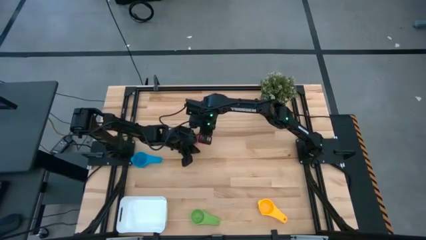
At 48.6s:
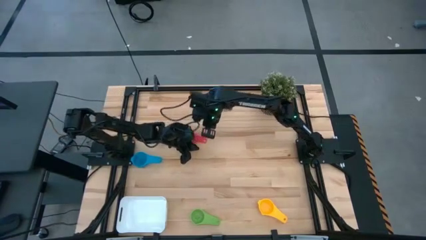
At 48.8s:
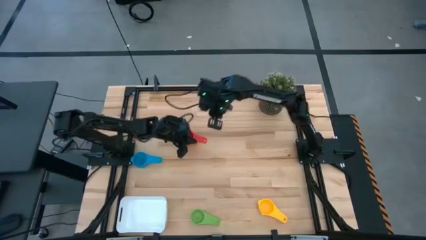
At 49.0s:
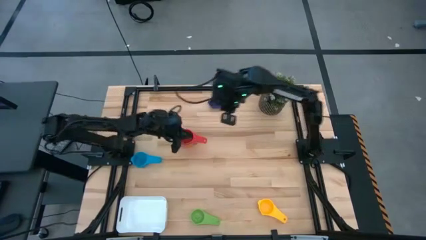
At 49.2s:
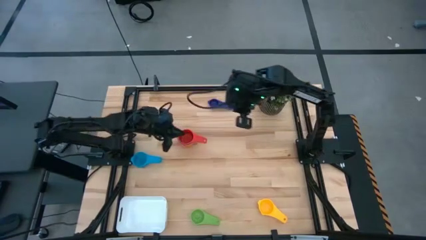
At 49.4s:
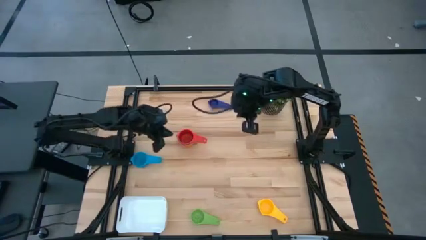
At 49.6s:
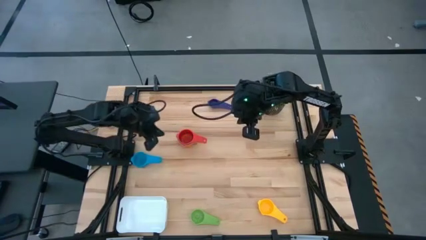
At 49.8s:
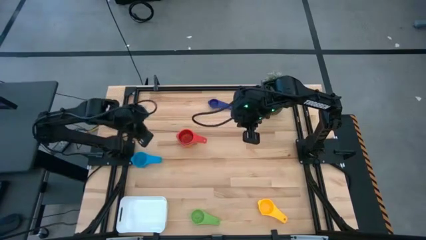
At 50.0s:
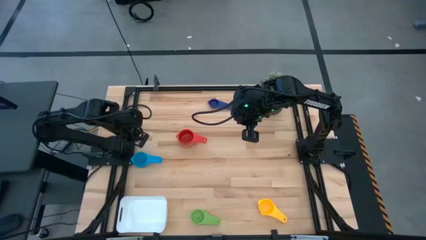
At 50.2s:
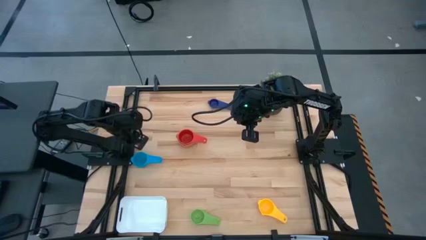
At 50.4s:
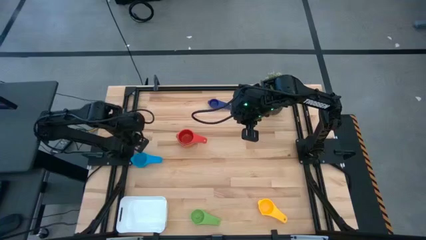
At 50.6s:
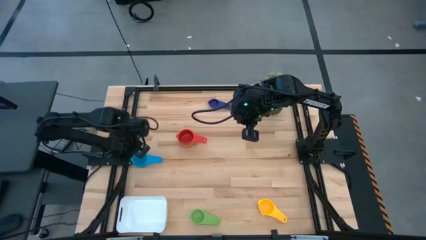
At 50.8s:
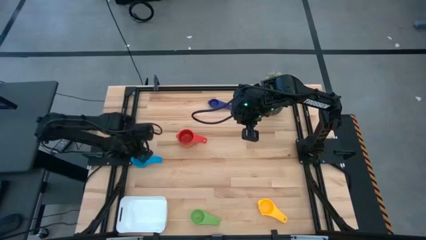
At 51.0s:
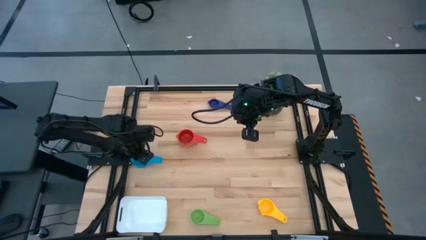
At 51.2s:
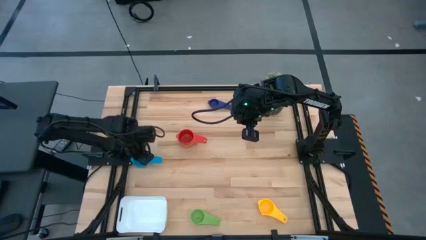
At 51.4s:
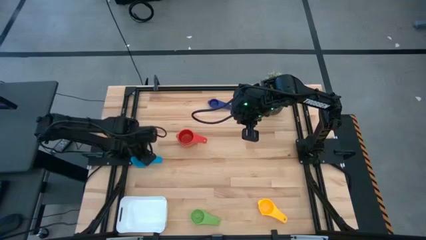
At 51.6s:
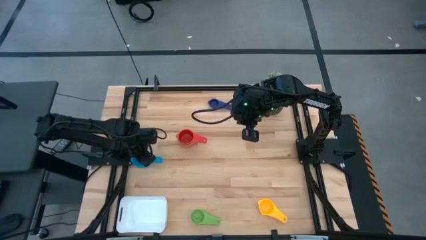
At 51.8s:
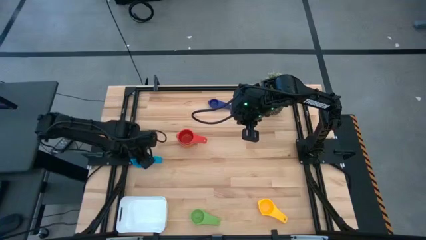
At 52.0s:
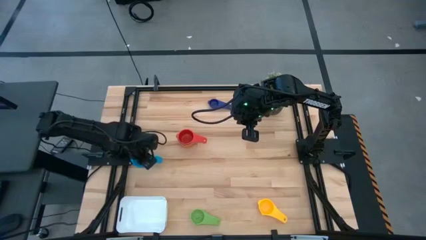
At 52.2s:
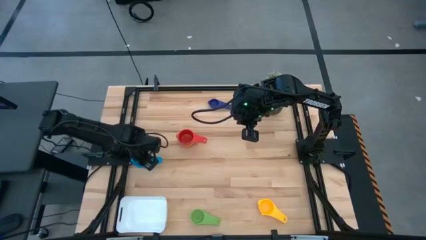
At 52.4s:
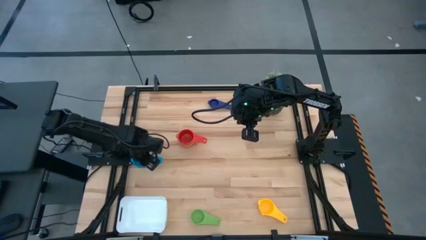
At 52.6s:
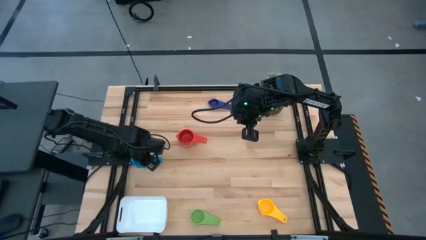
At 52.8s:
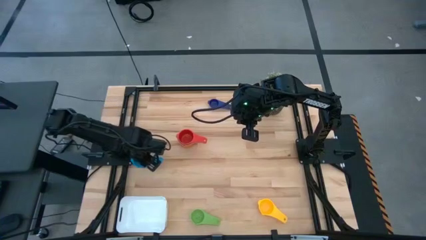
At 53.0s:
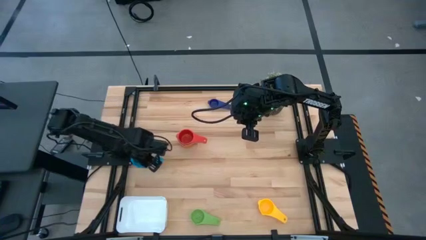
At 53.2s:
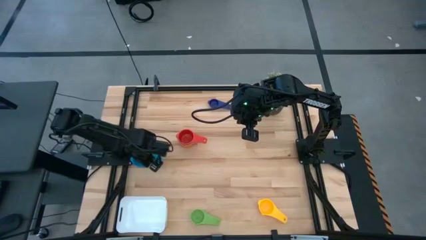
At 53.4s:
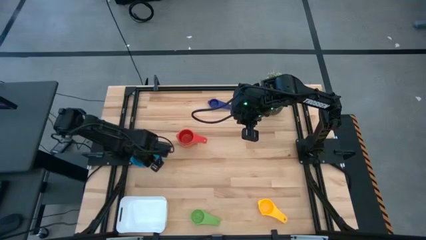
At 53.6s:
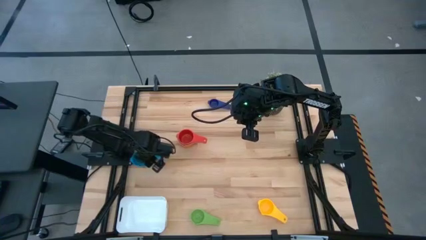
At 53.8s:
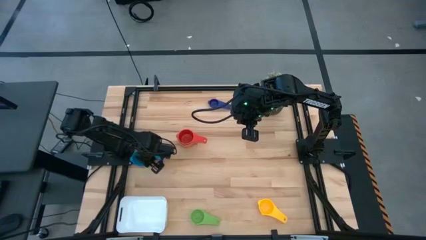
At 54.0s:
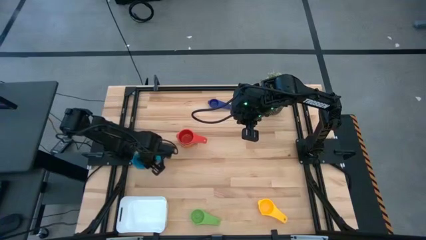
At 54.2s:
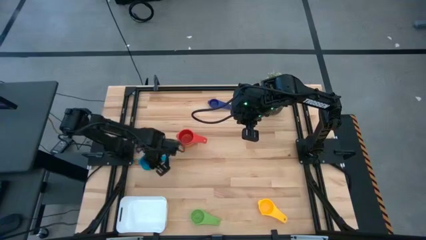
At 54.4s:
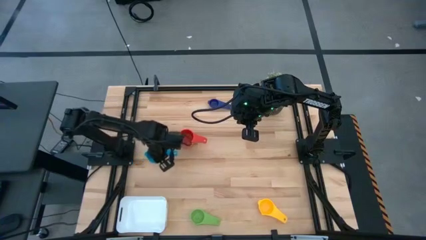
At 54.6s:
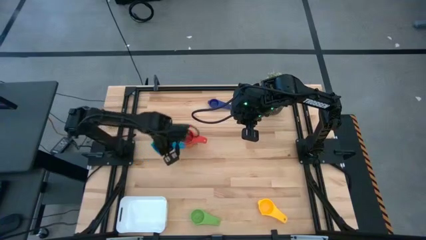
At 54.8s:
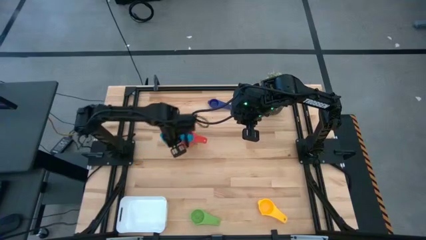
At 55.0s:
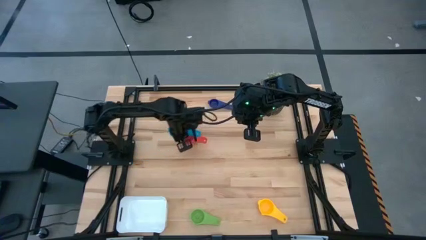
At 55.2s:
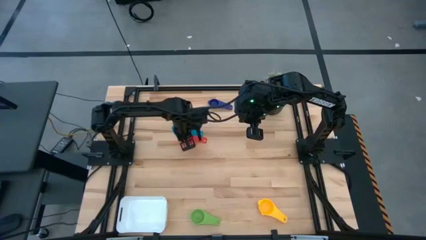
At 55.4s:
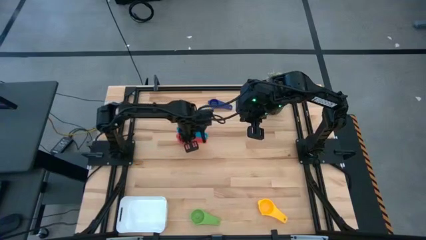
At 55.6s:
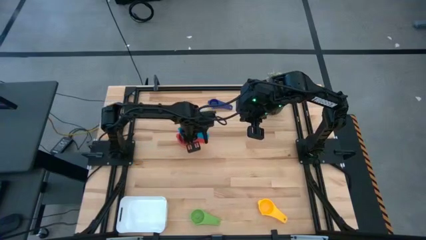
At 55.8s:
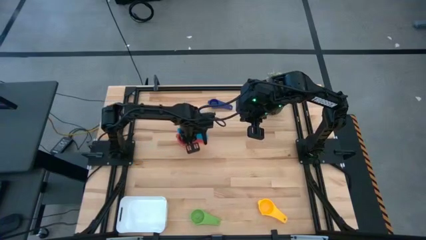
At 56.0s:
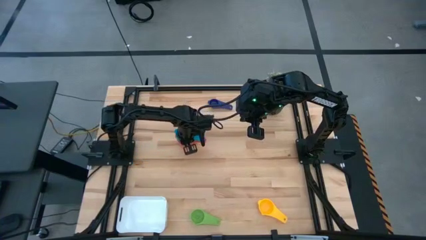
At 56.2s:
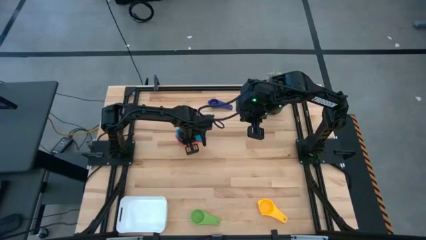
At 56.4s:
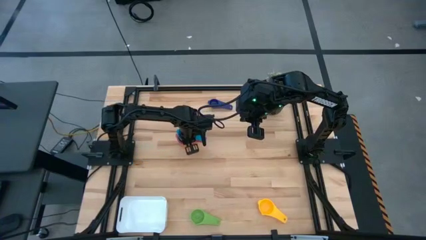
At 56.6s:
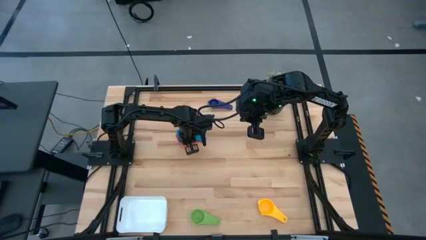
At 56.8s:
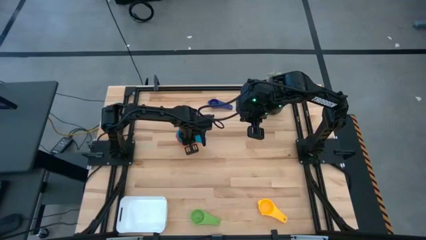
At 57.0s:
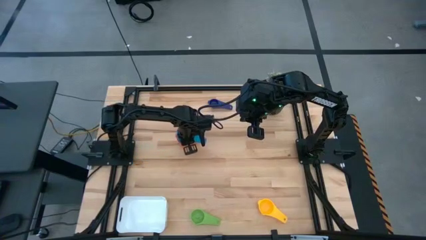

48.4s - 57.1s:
Task: Nest measuring cups in basket
Stack the light blue measuring cup into the red measuring cup

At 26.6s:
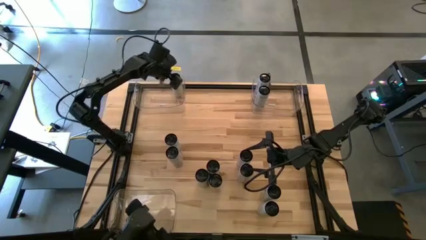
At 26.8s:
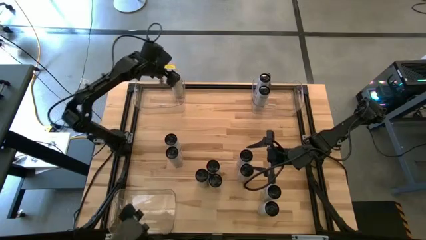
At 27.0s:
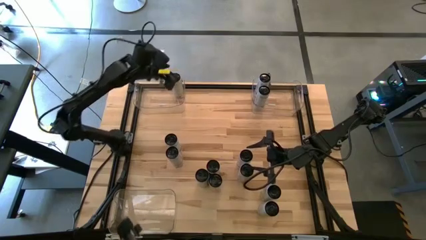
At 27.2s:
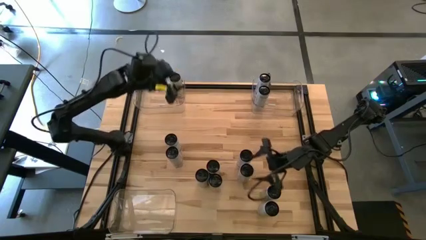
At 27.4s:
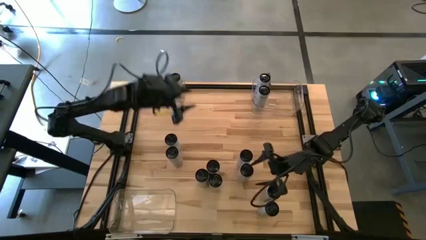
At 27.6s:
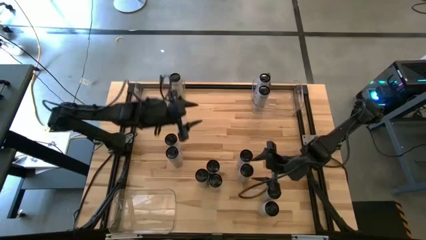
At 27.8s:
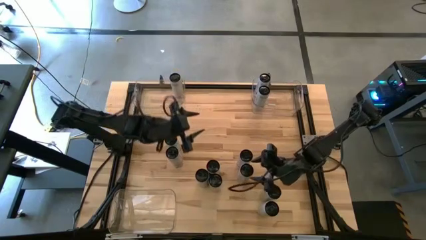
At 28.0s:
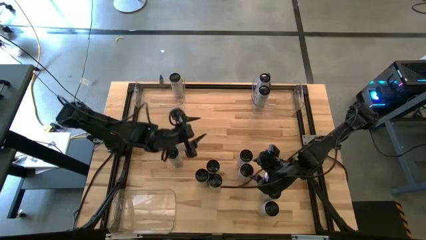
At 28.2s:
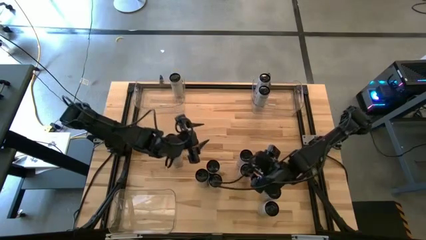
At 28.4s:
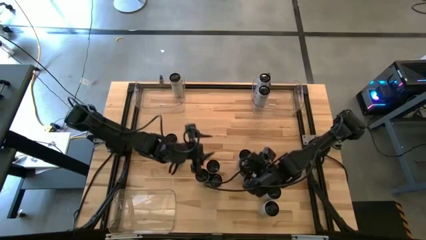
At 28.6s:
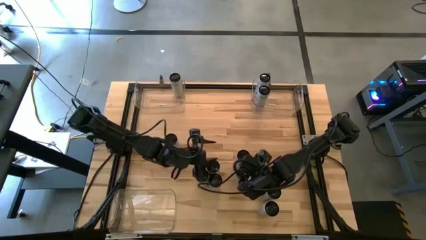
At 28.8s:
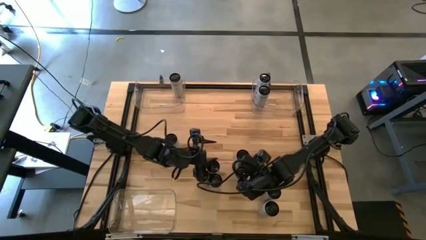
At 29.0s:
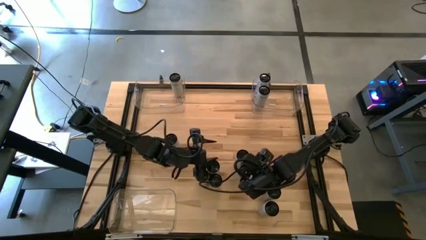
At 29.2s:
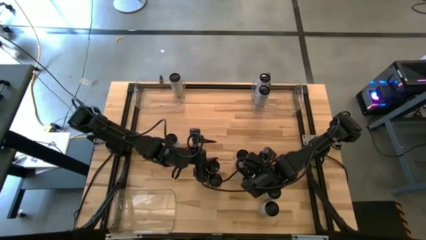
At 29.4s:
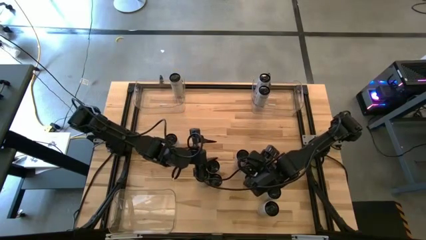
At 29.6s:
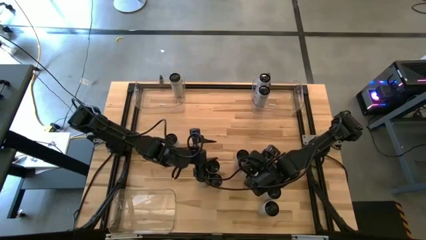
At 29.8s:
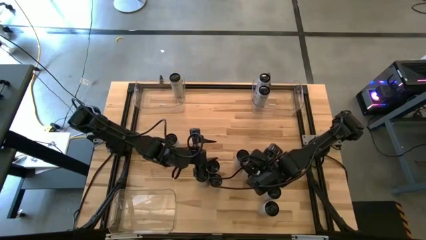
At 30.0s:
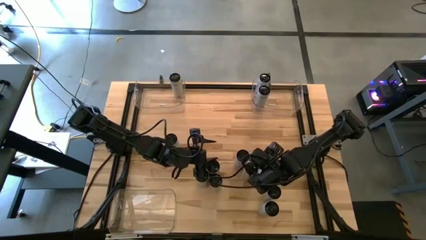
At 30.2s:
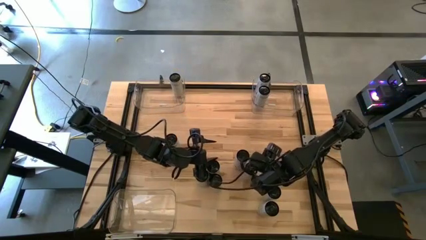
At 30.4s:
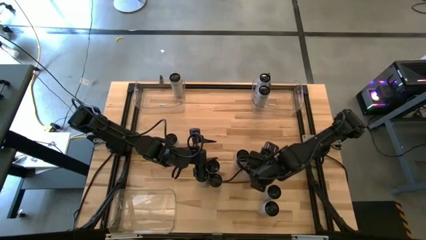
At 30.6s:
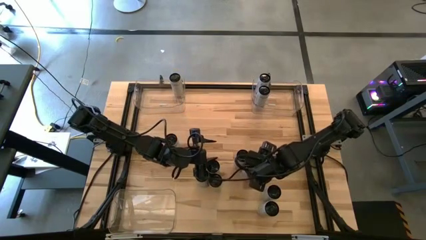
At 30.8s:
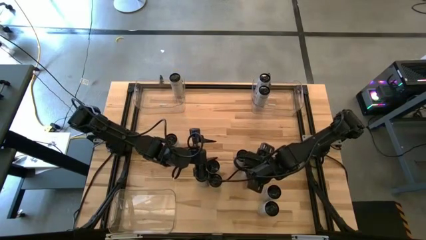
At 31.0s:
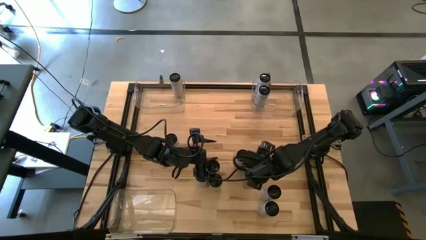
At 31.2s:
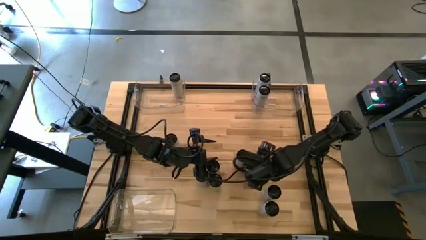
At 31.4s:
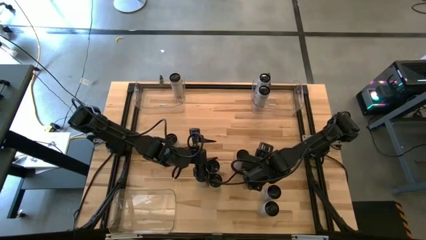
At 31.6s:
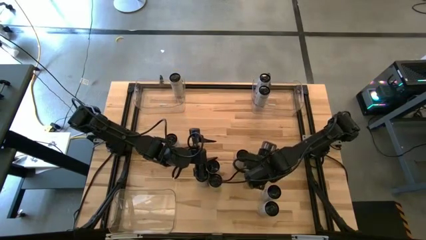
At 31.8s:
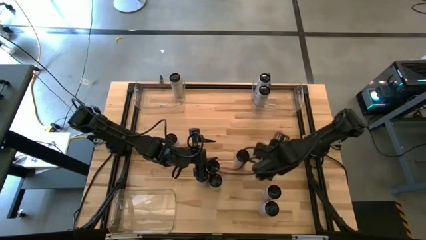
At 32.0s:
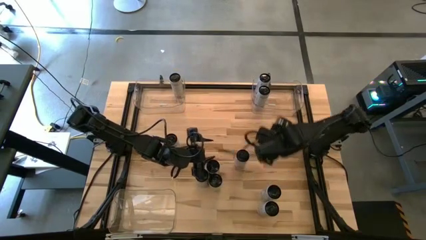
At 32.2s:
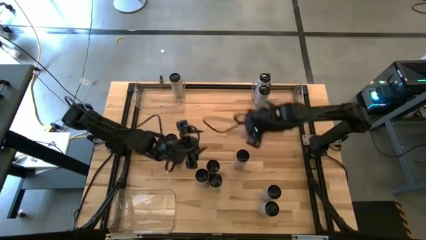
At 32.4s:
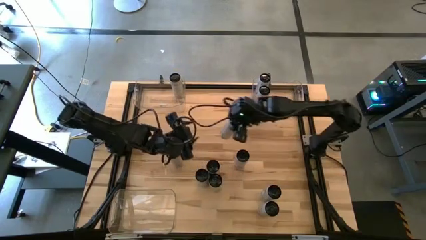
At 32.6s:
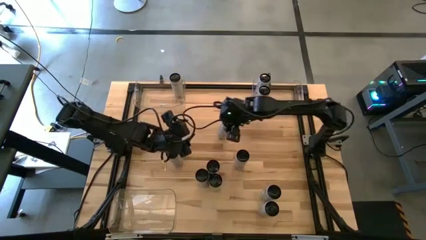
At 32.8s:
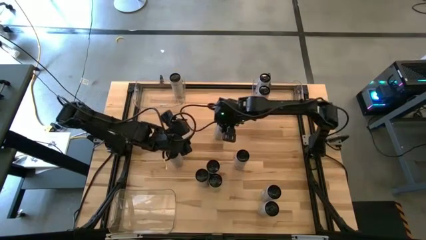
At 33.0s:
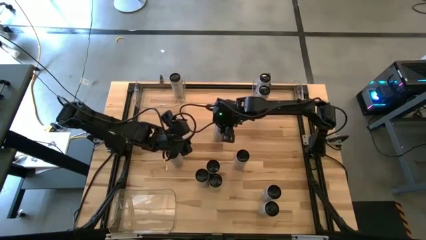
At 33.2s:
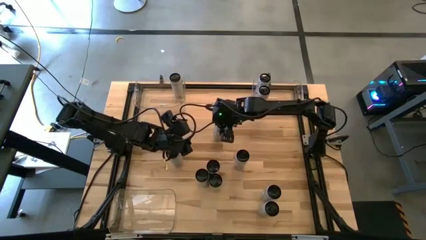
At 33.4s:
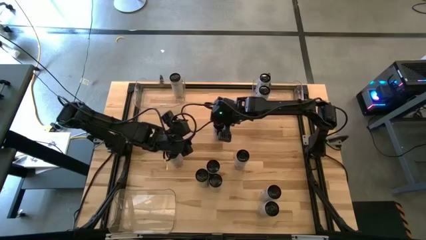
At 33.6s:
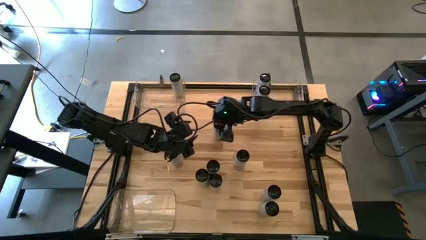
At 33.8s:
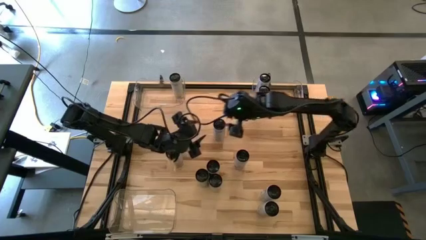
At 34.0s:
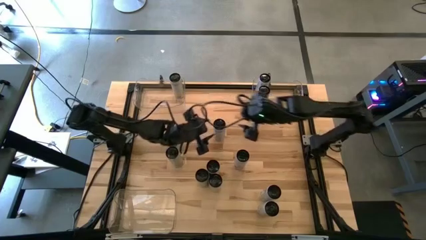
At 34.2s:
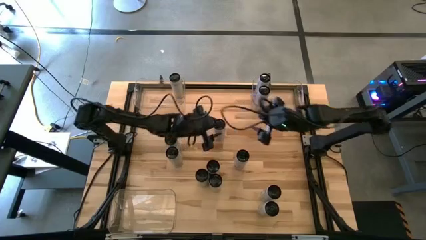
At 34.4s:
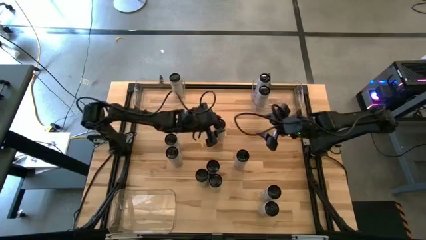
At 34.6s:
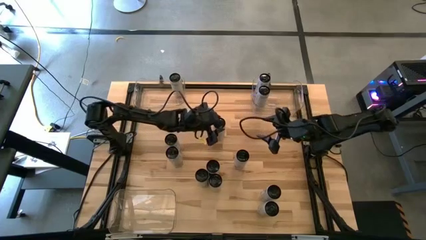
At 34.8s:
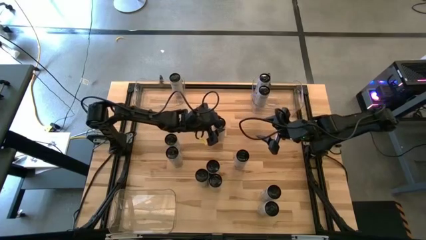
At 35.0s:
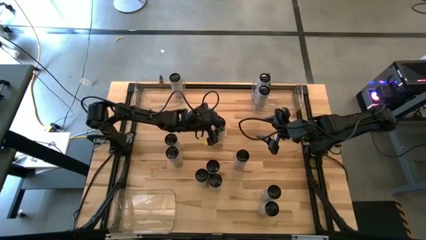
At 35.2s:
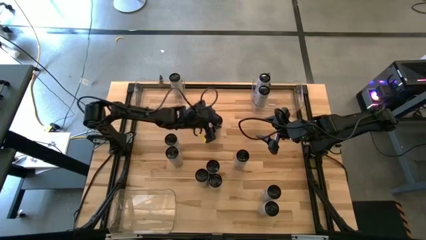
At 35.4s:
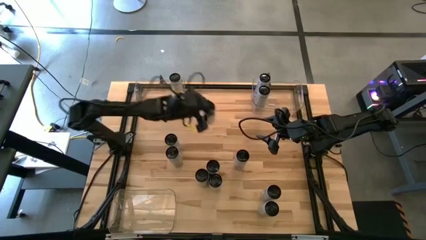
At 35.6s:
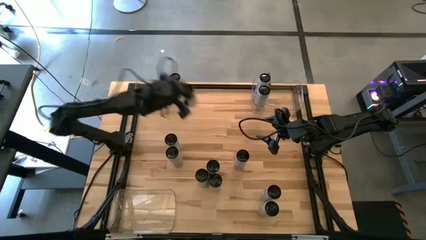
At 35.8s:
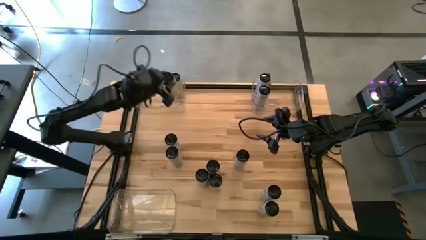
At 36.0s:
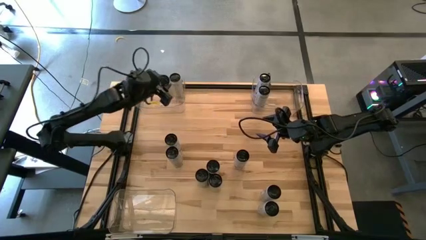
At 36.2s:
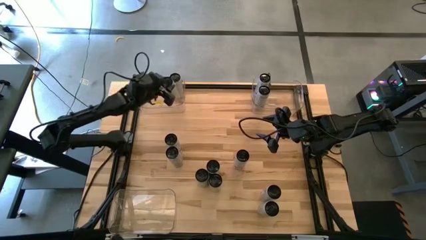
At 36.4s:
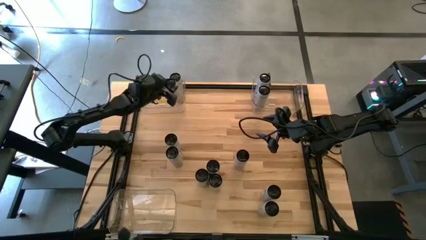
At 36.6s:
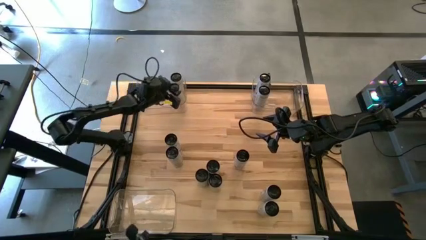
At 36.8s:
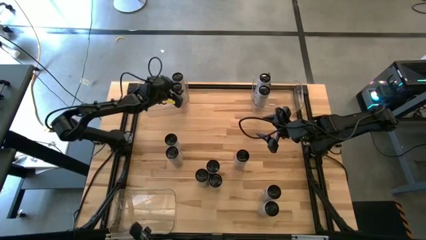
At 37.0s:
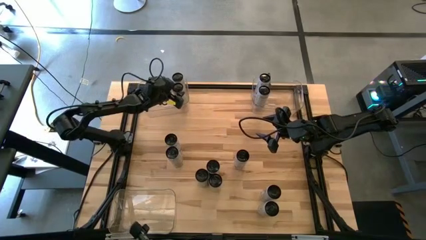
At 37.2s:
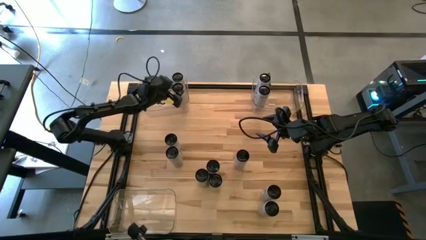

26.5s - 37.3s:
Task: Sort soda cans
Put the white-yellow soda can into the top left transparent bin
